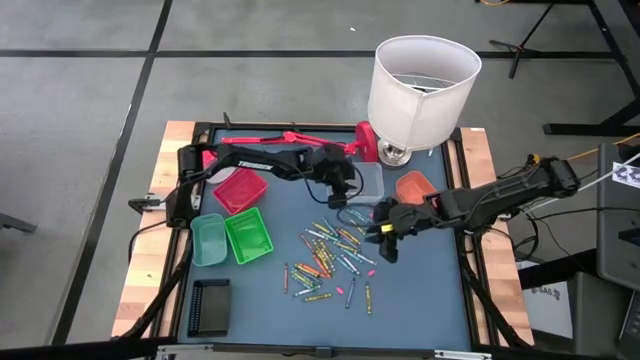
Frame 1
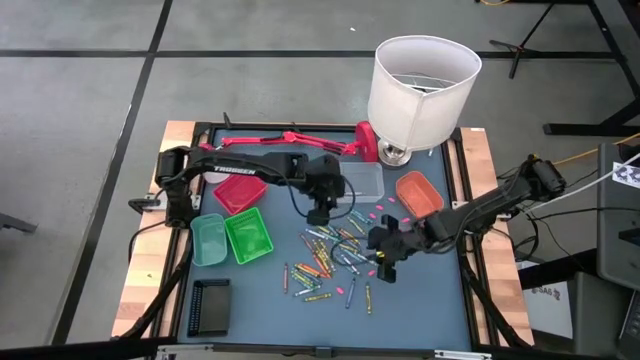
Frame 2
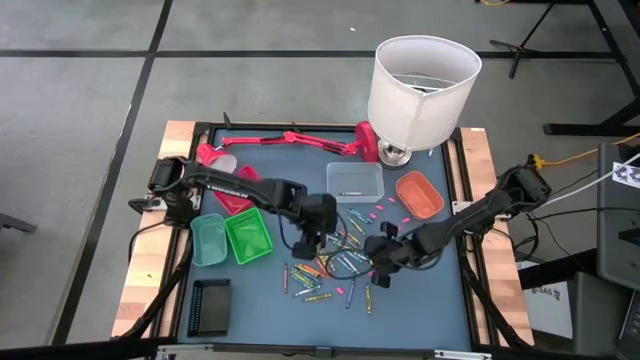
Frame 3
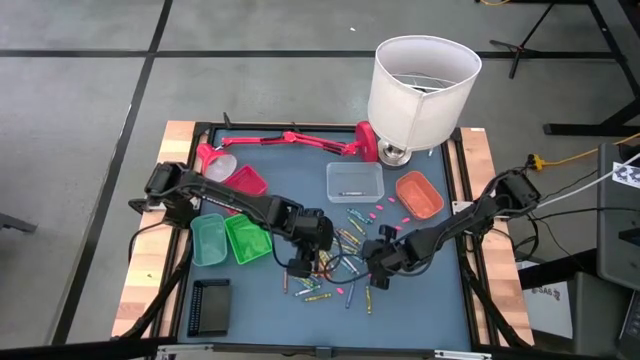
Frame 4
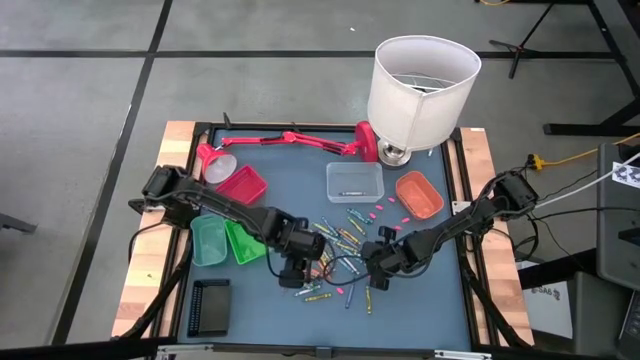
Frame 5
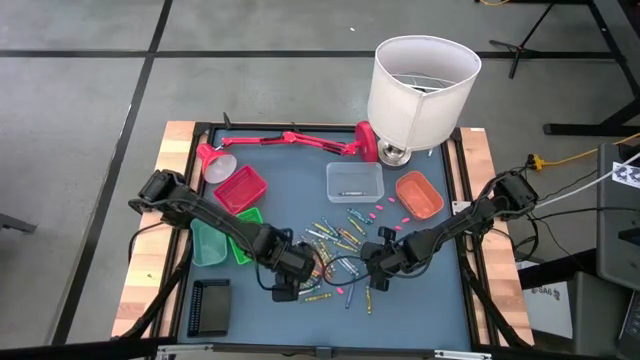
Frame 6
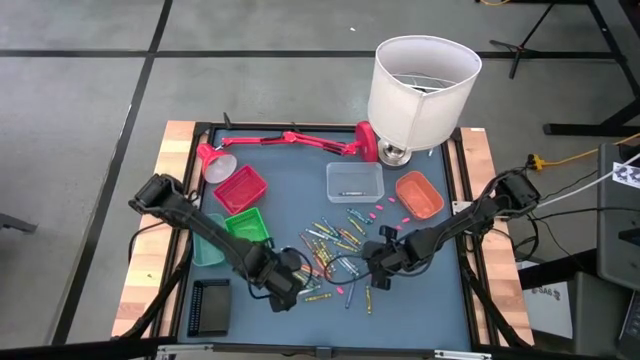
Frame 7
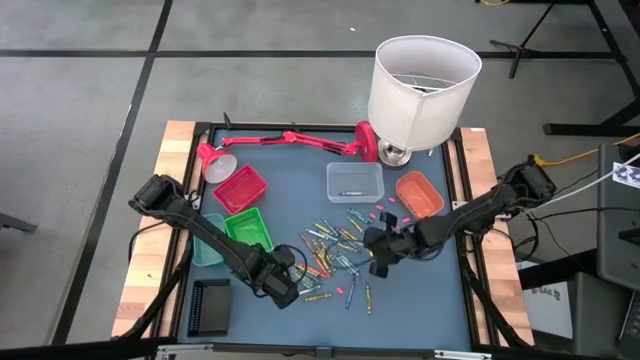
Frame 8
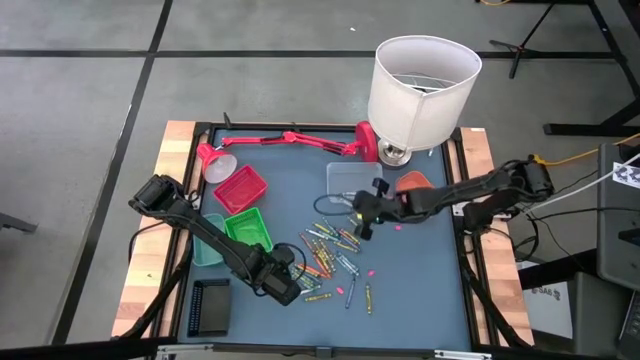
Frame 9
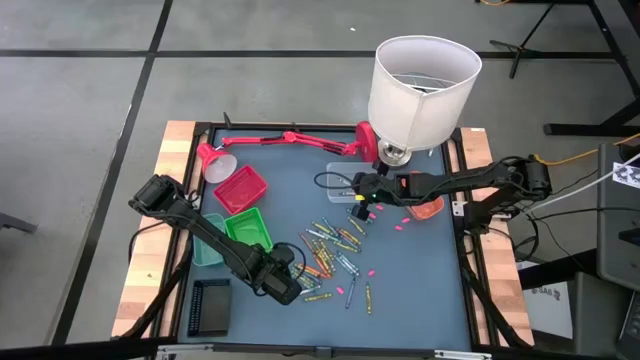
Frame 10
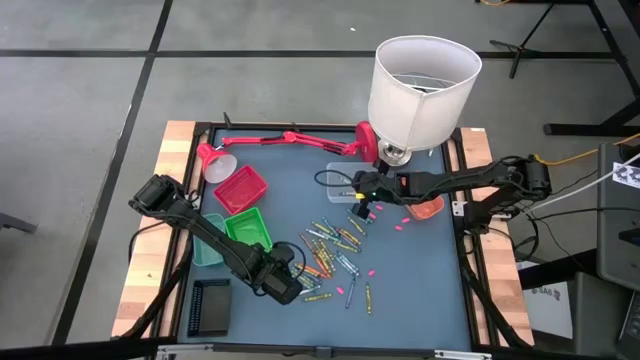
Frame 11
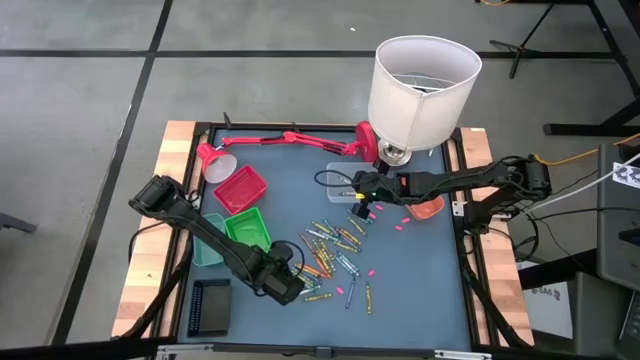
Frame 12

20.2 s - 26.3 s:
Task: Sort crayons
Put the gray crayon into the transparent bin

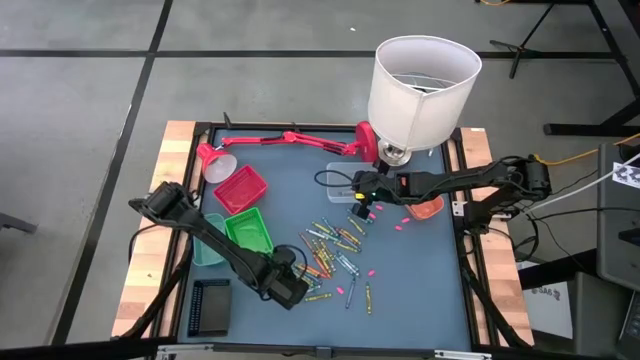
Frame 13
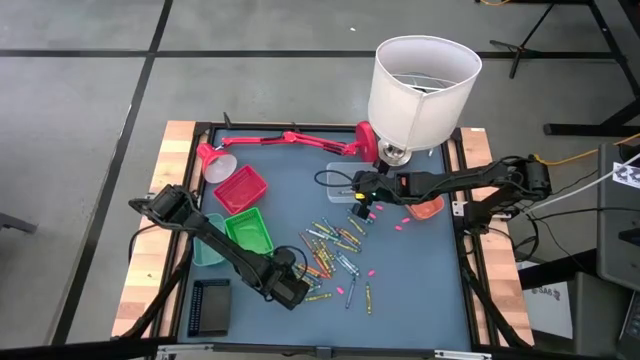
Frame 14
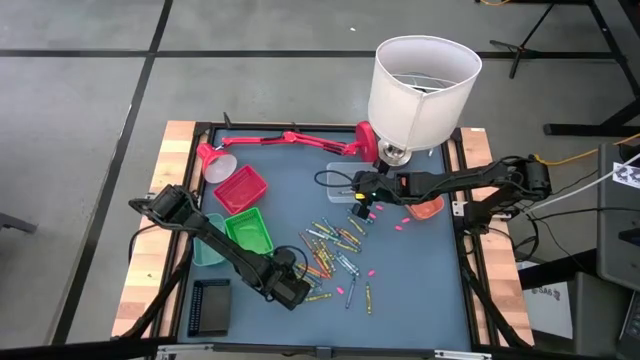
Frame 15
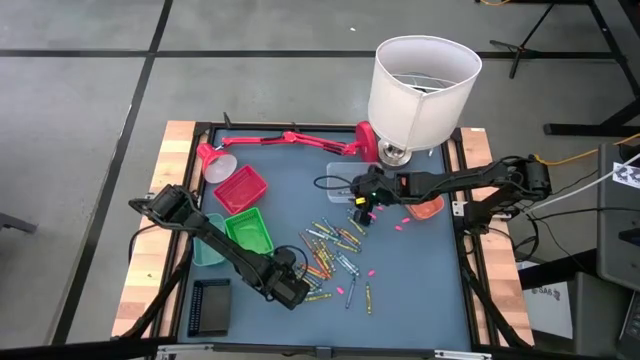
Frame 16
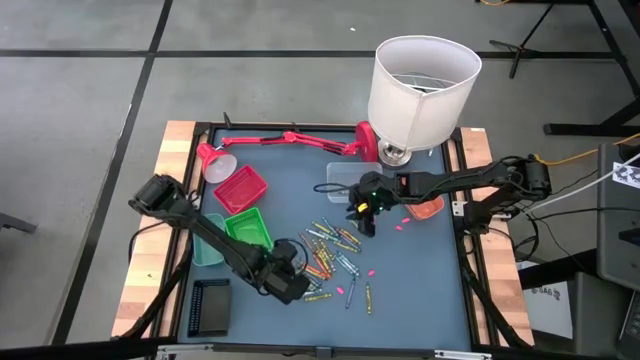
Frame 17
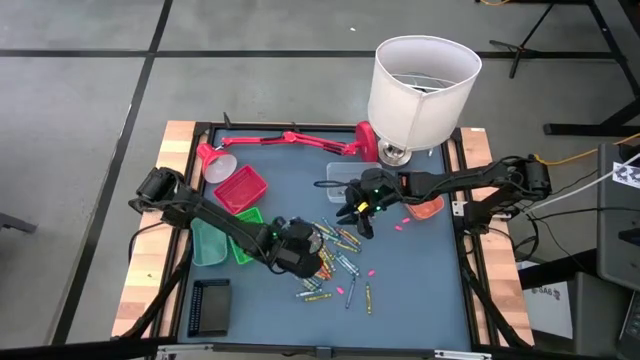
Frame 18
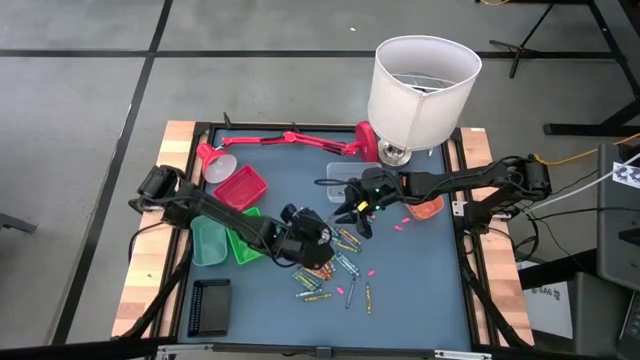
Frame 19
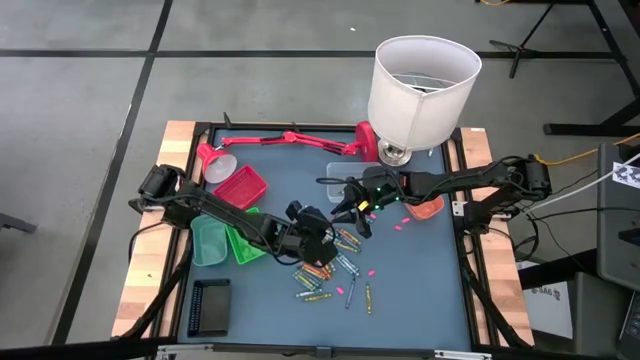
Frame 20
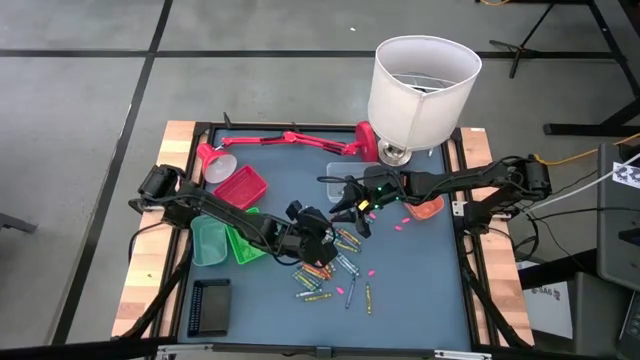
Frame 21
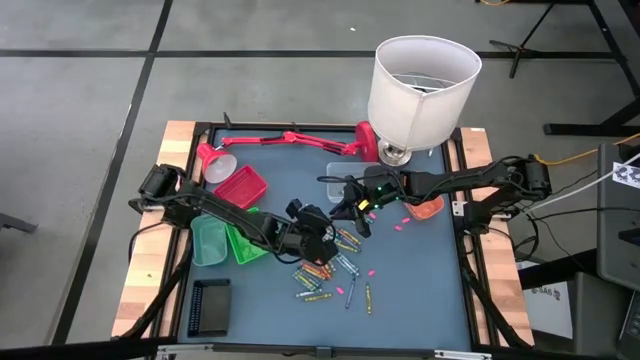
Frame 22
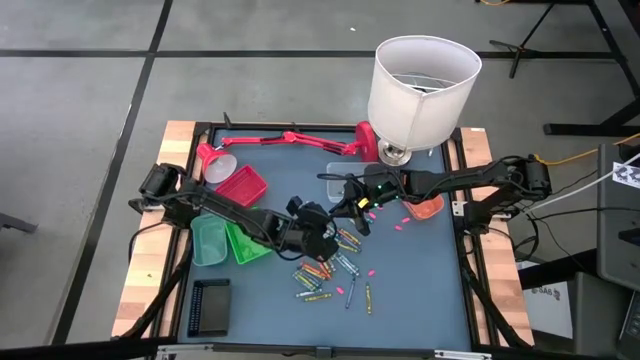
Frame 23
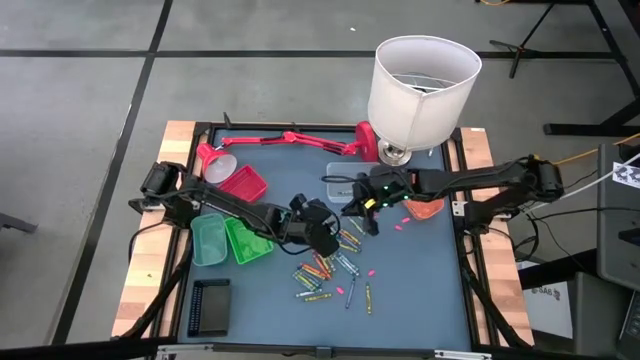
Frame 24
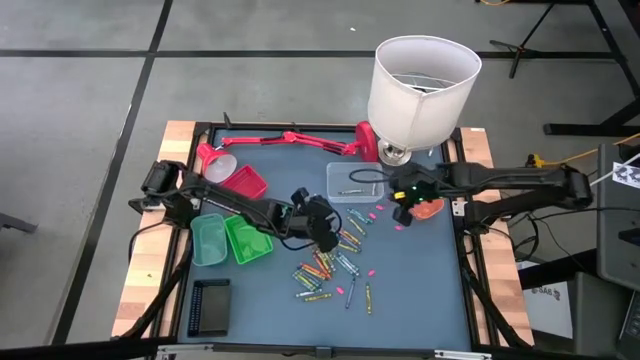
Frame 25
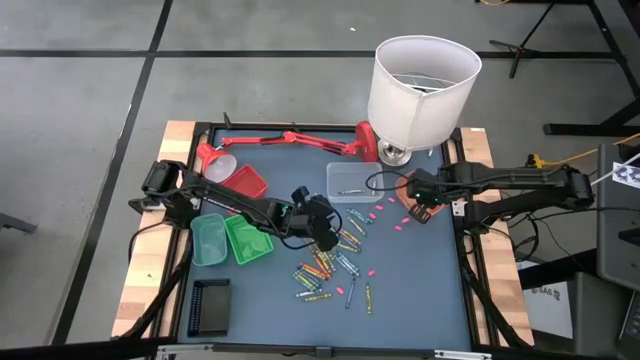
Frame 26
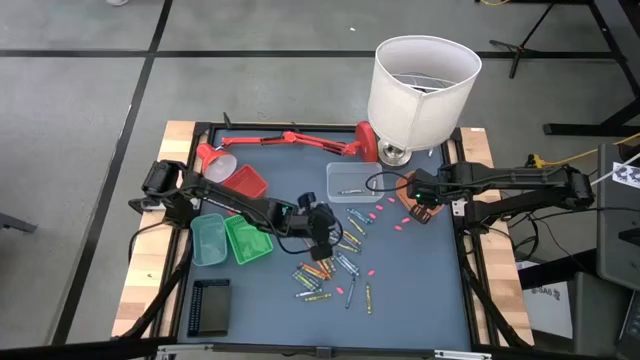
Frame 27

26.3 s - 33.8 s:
Put the brown crayon into the orange bin

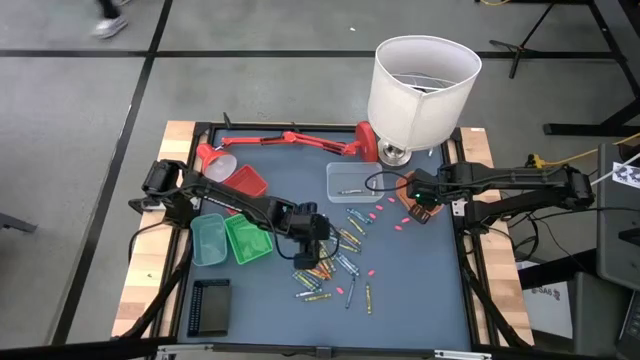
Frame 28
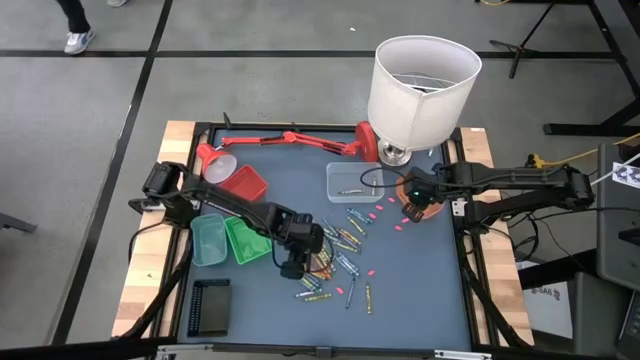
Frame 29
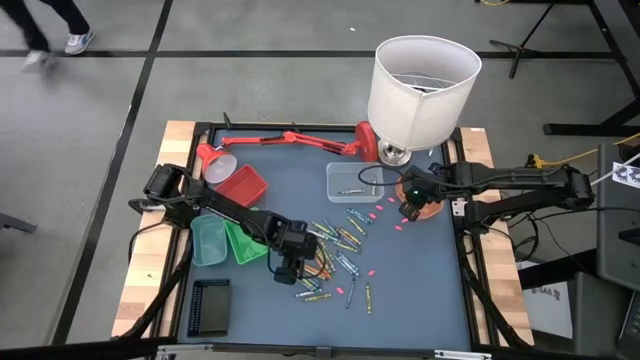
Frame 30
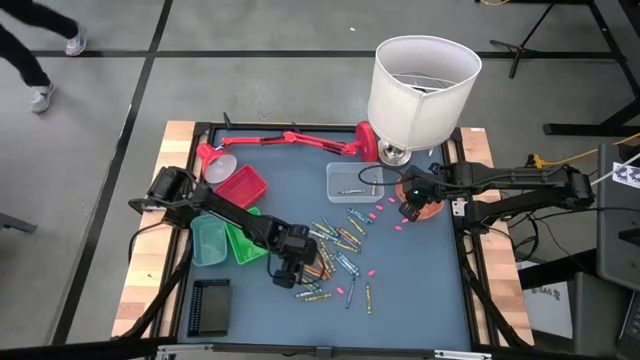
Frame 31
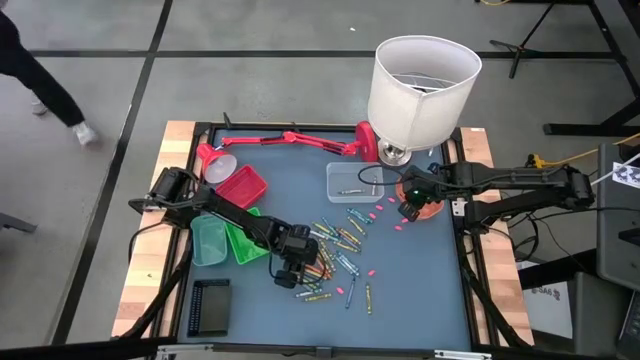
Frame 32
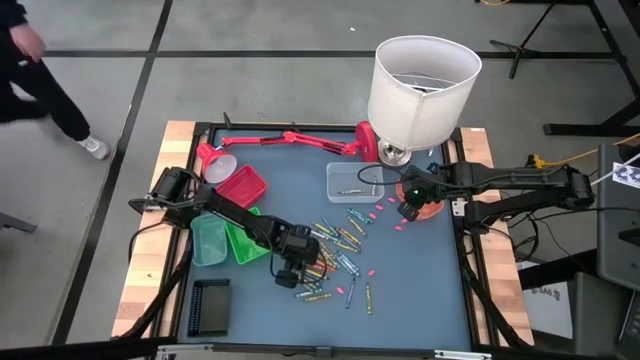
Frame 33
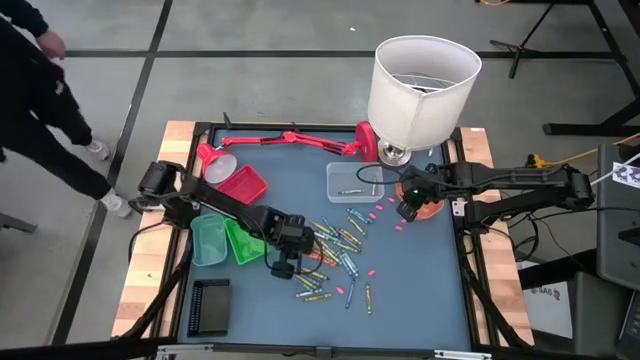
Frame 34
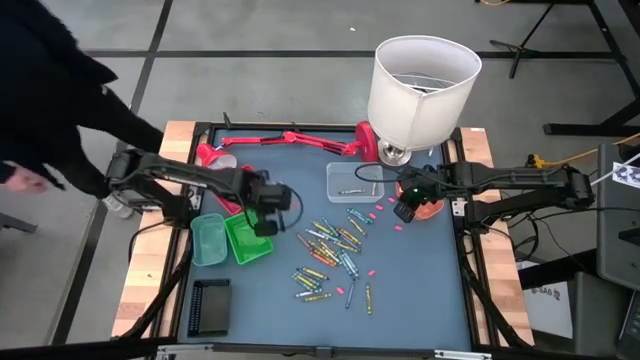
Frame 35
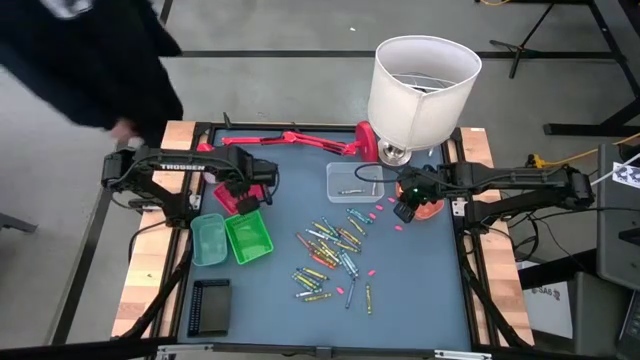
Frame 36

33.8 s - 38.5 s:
Put the orange crayon into the red bin

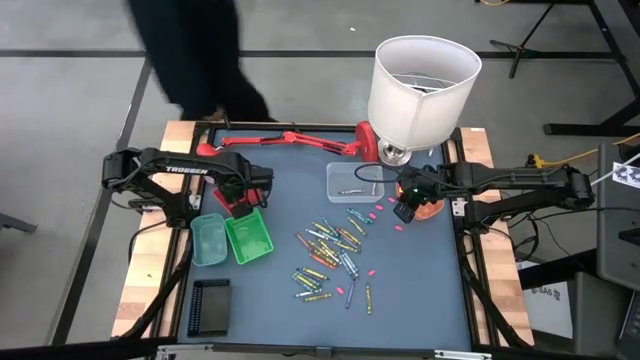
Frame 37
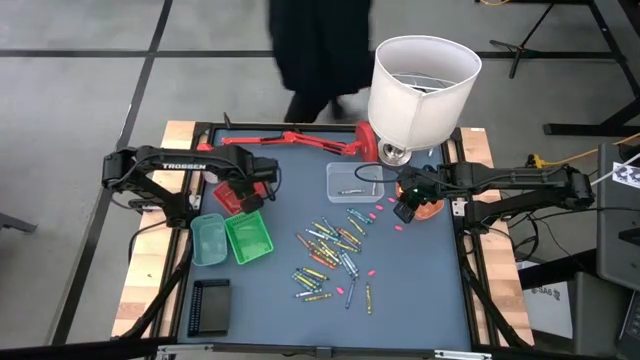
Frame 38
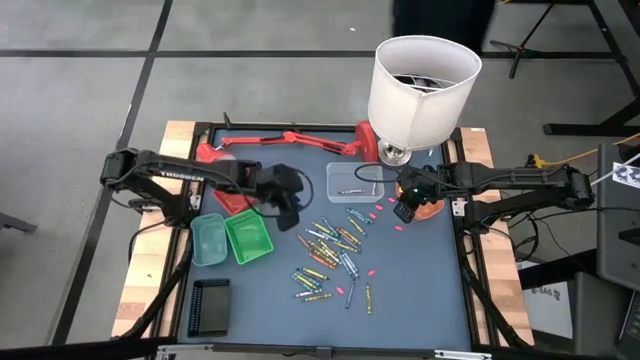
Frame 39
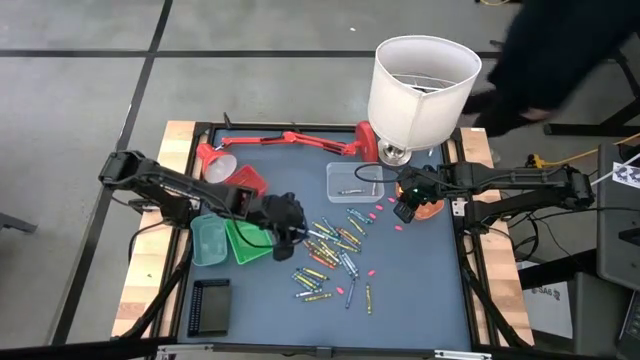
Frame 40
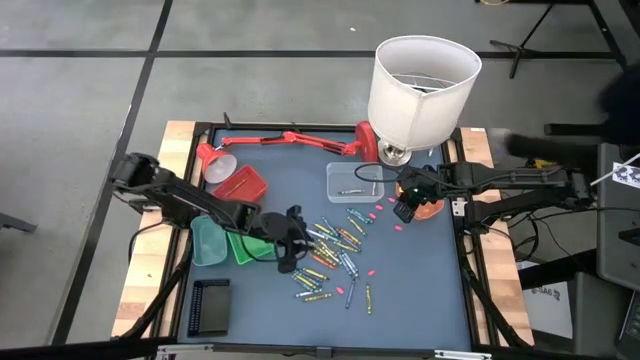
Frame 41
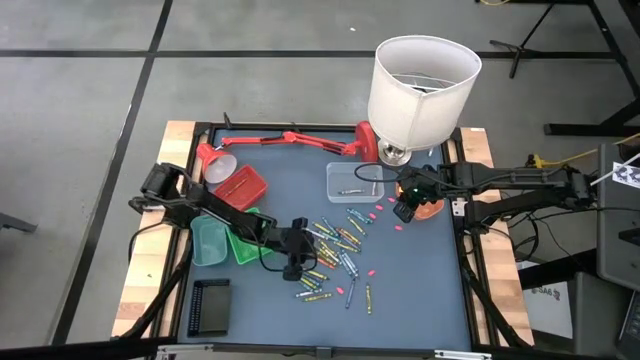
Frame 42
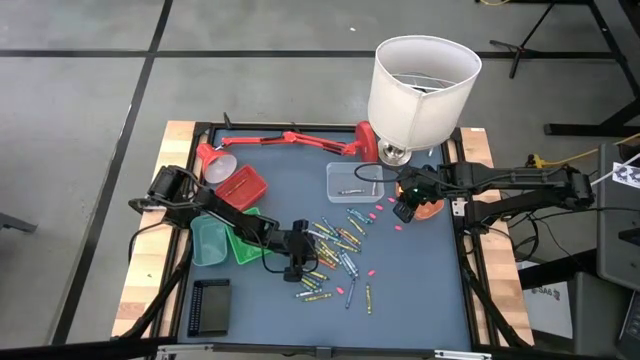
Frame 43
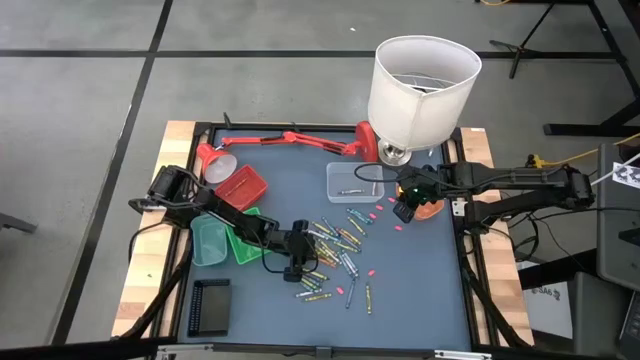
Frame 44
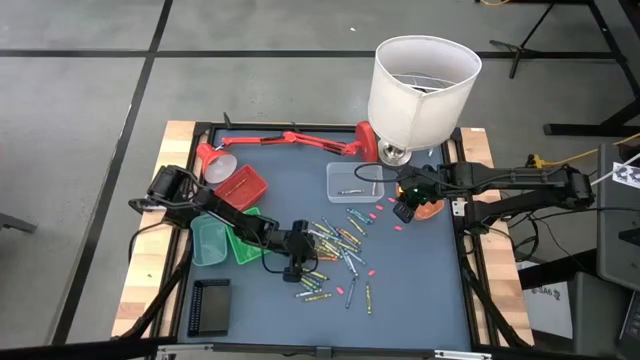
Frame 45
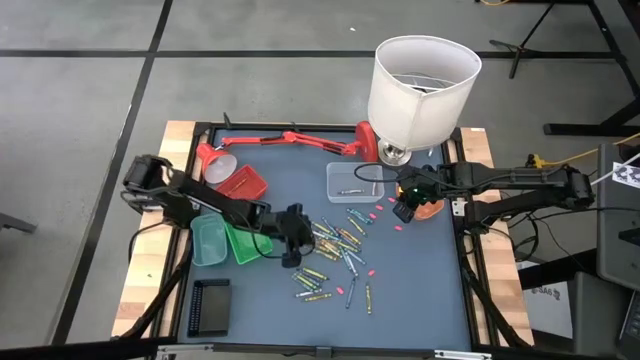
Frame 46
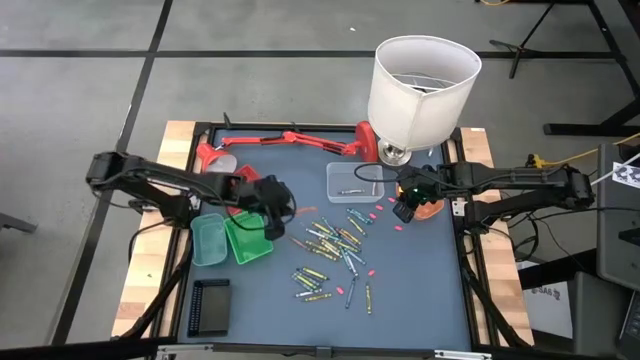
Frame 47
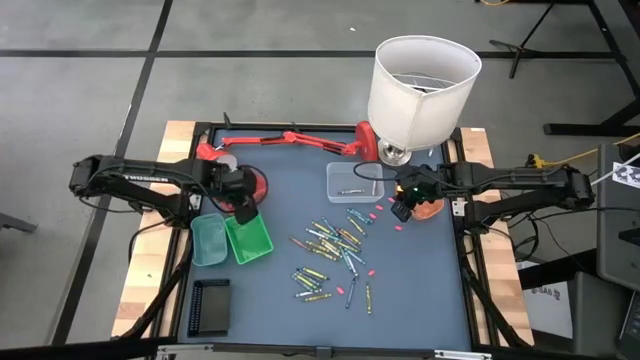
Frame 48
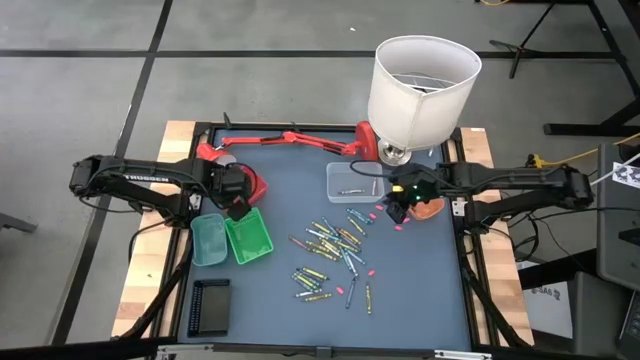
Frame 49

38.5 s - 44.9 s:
Put the orange crayon into the red bin
